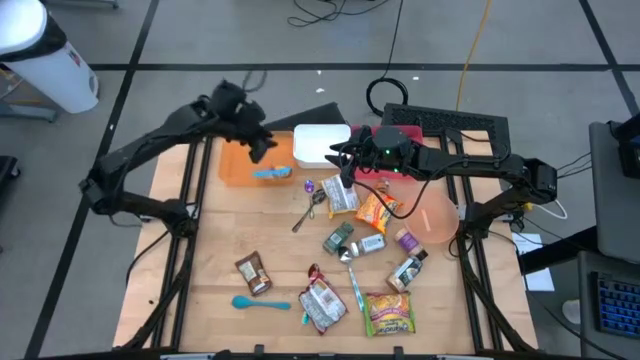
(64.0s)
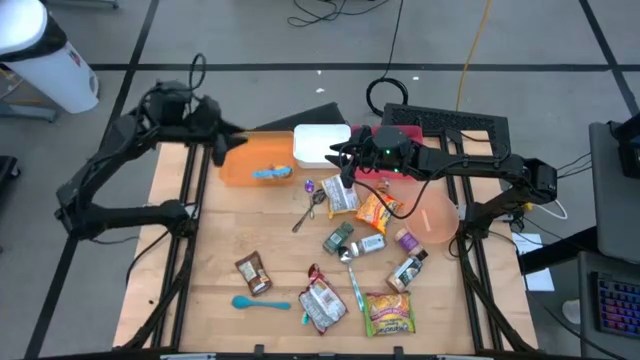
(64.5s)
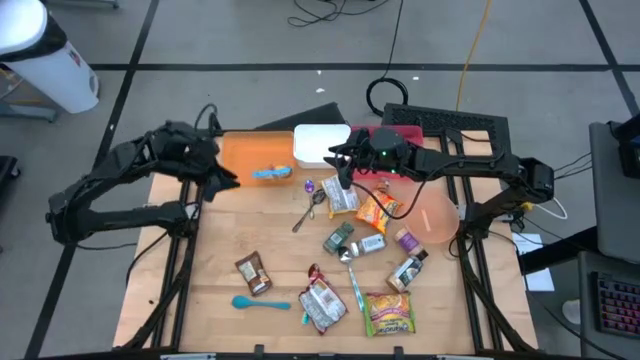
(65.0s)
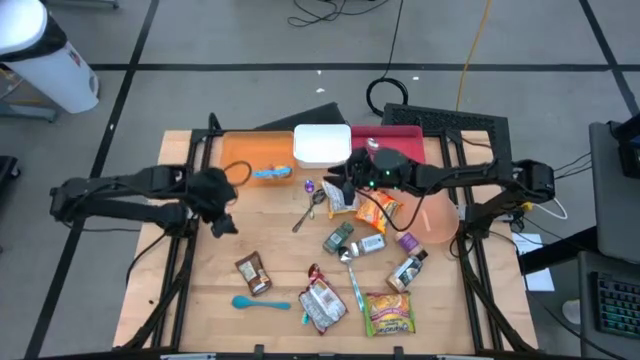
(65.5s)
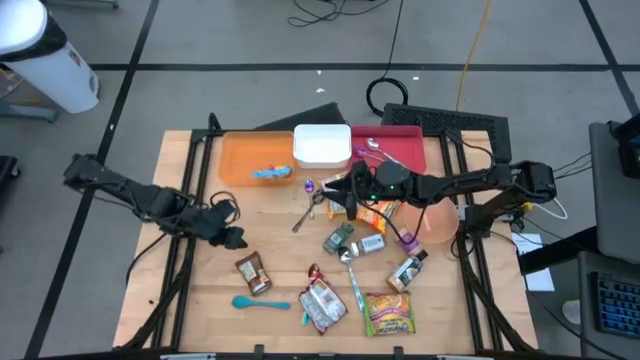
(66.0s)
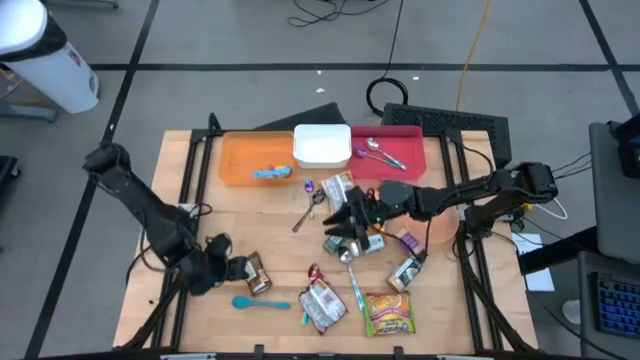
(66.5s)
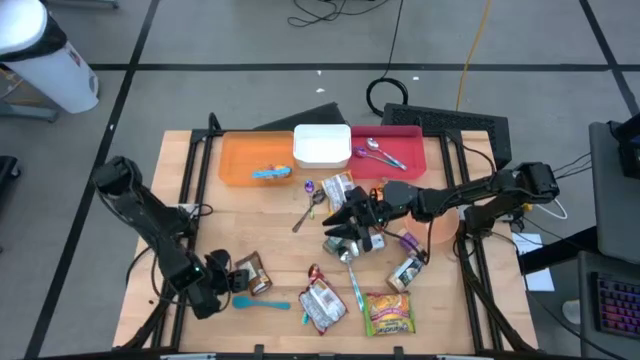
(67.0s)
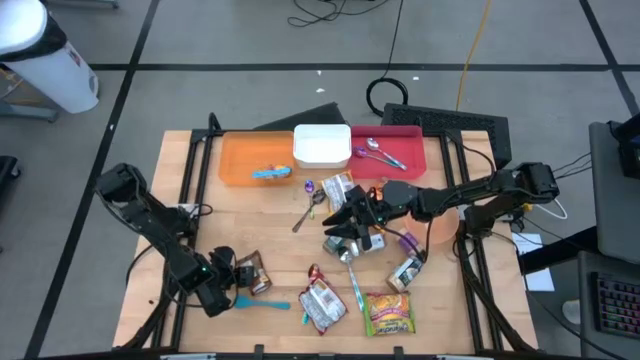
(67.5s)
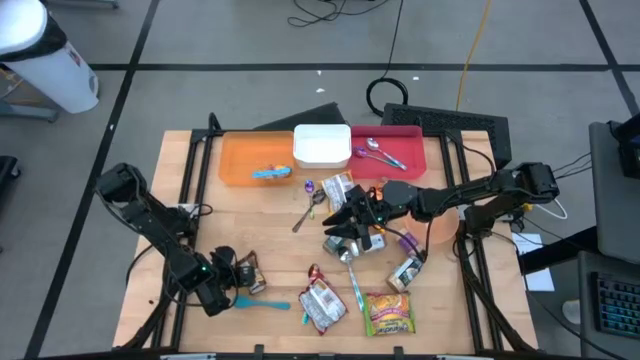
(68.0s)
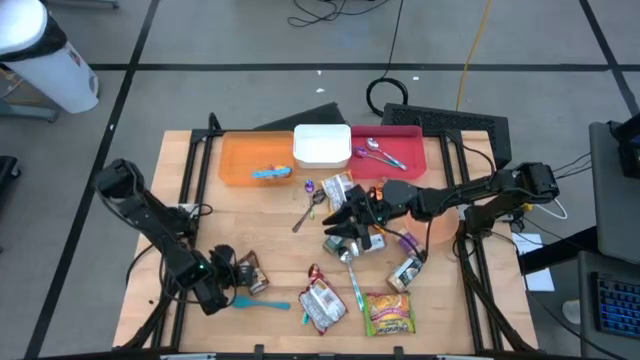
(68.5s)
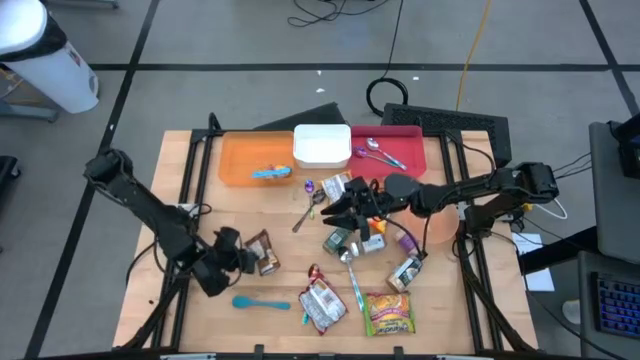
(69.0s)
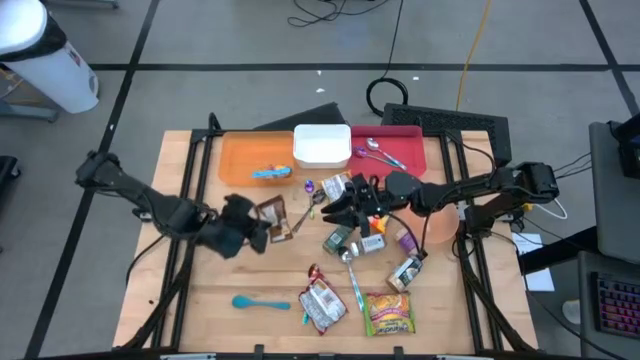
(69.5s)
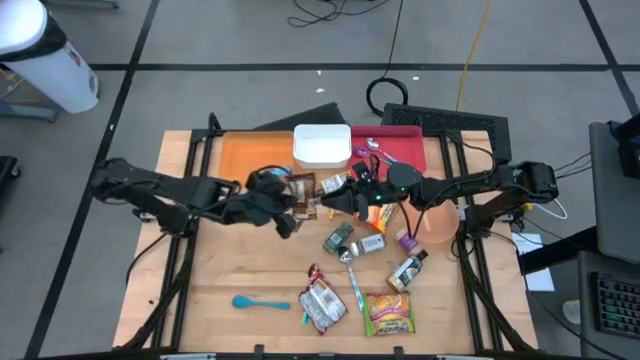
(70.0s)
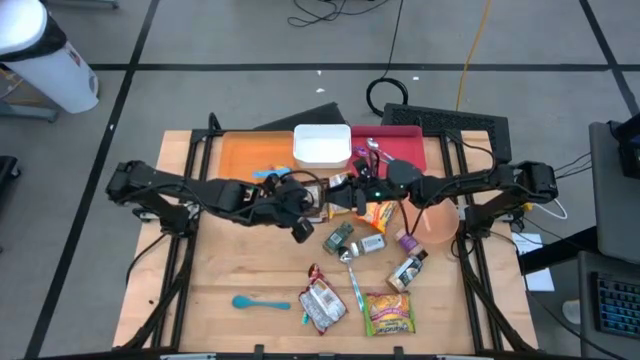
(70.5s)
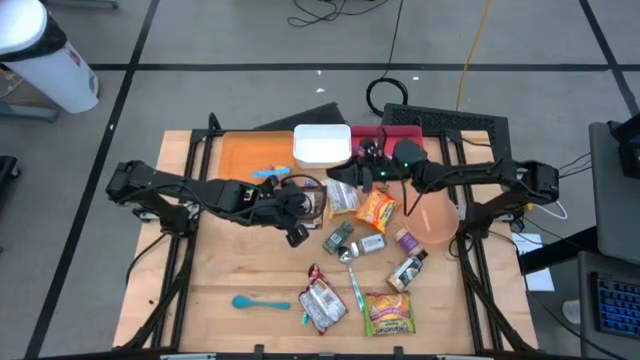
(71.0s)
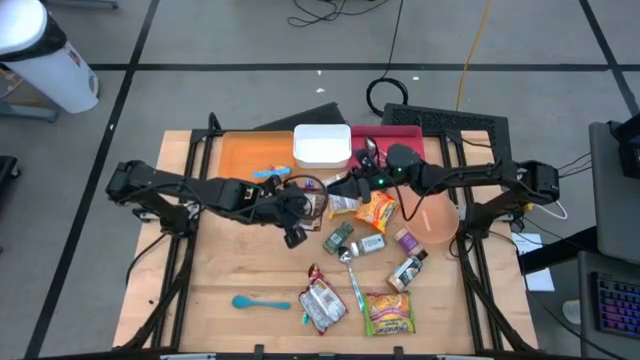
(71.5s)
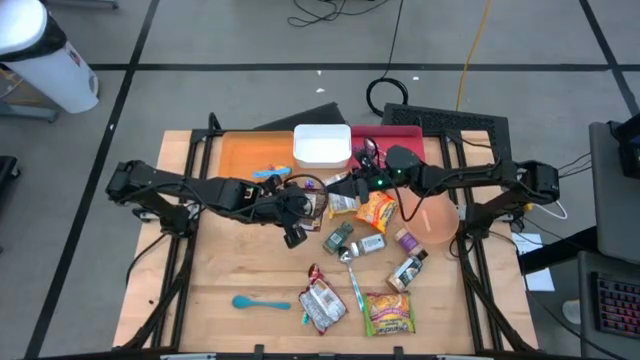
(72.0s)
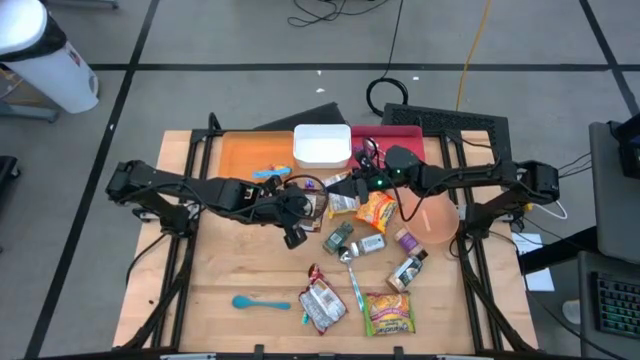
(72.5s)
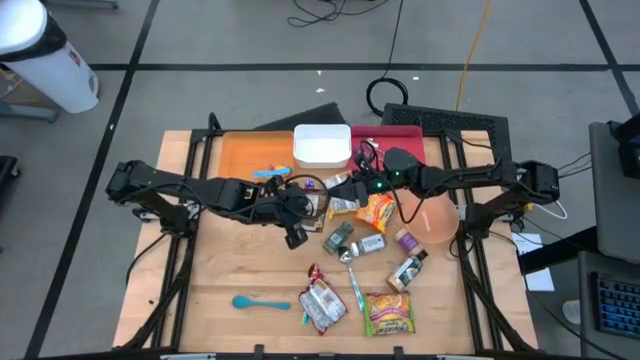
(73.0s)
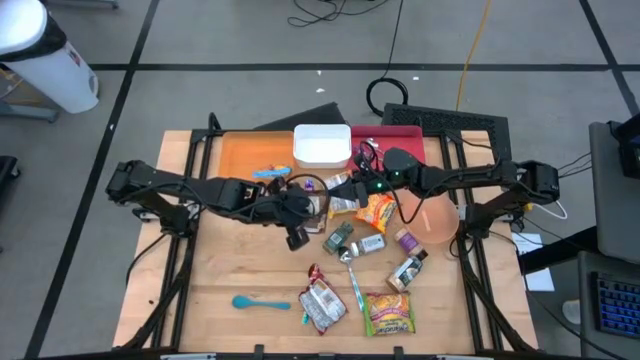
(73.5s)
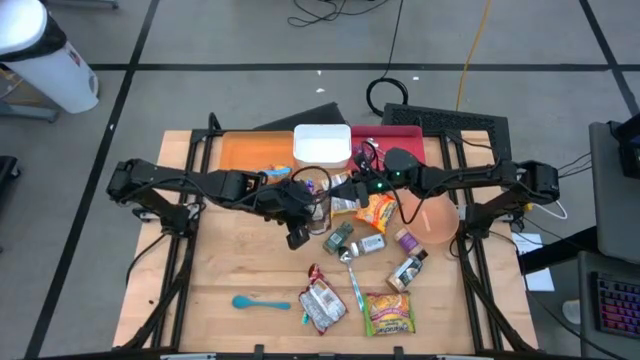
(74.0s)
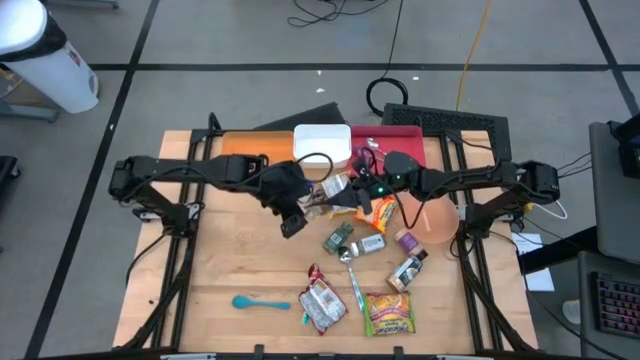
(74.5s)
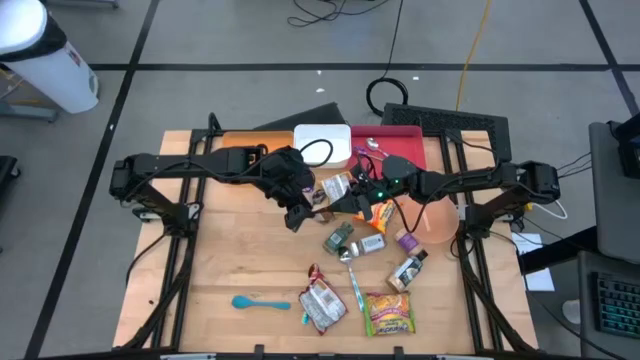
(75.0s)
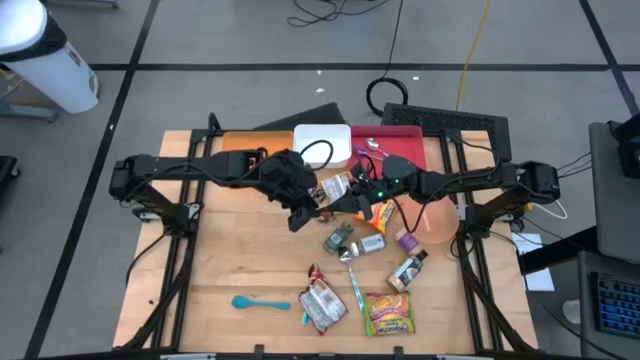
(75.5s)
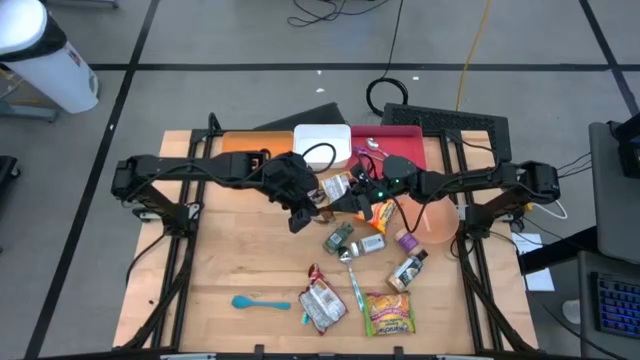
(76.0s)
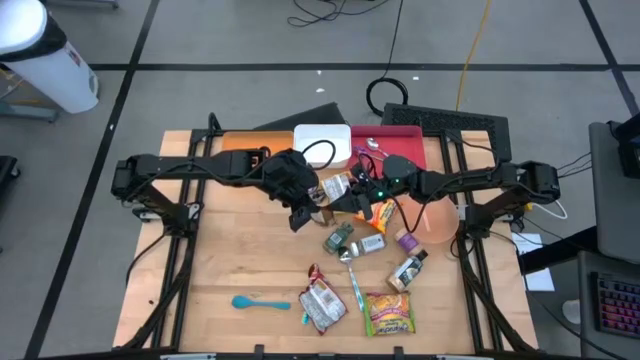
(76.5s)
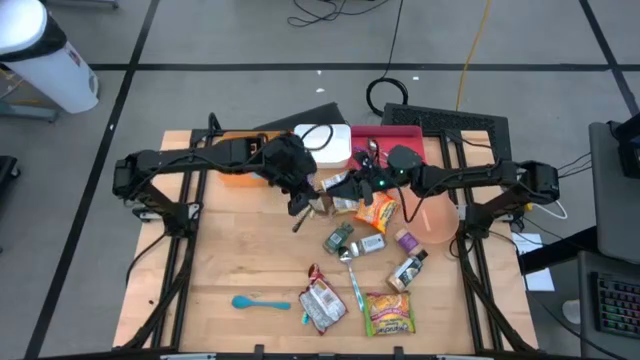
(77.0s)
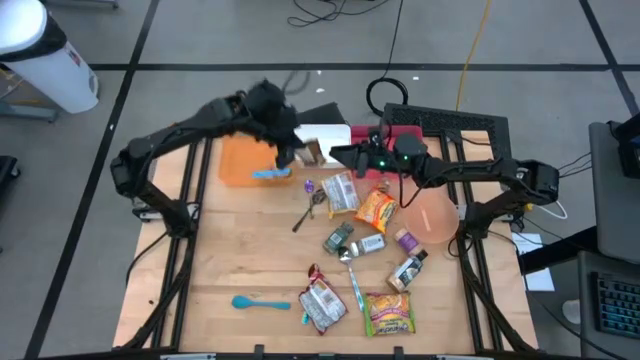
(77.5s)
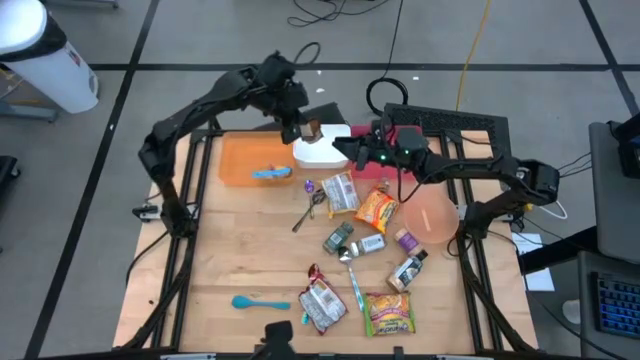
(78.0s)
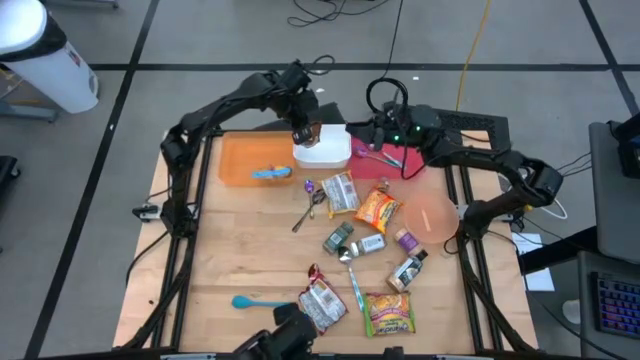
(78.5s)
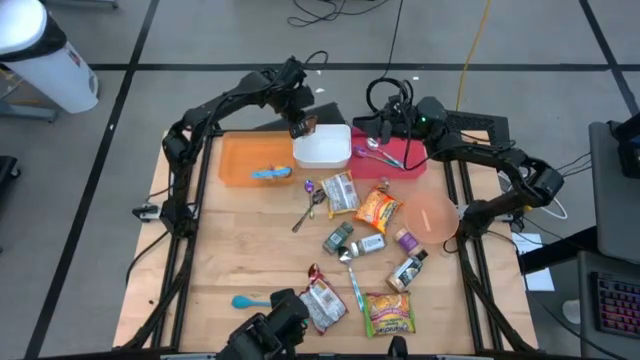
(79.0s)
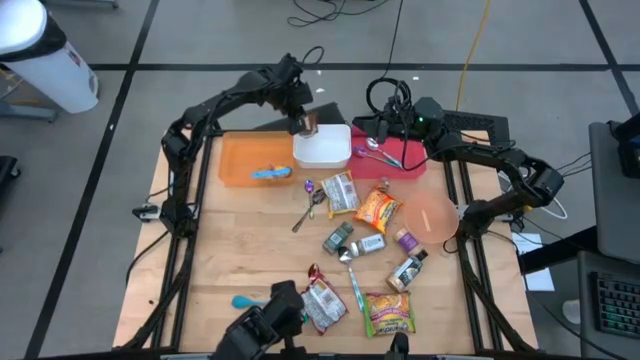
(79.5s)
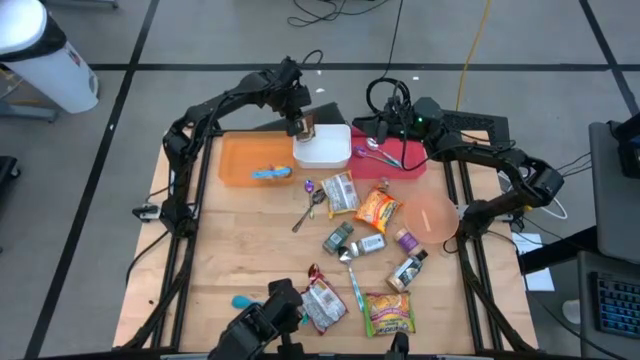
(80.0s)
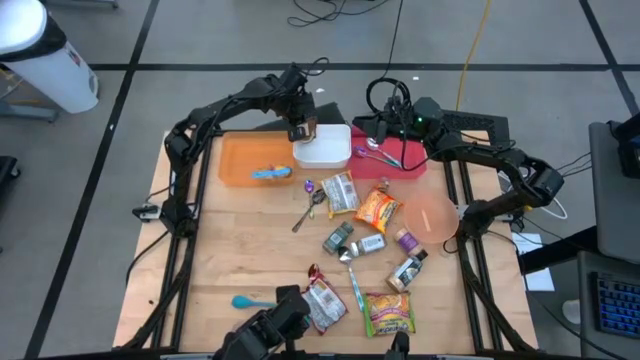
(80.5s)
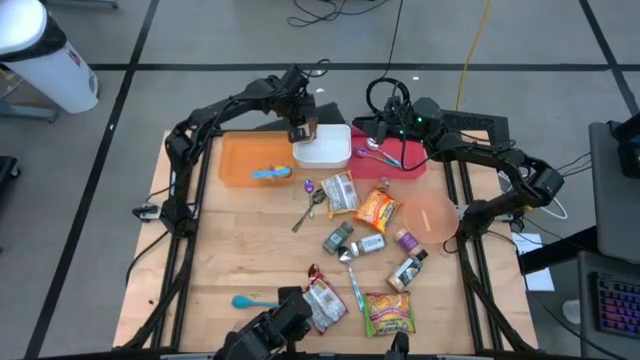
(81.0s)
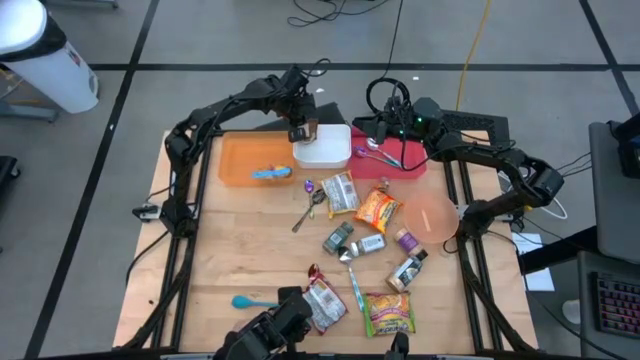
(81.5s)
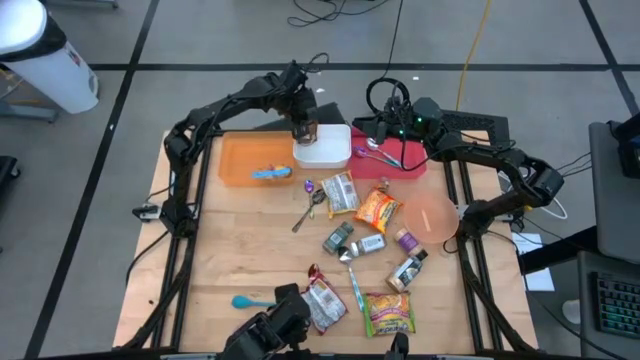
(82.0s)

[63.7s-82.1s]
Task: Pick & Place Food Item
Put the orange seasoning into the white bin
